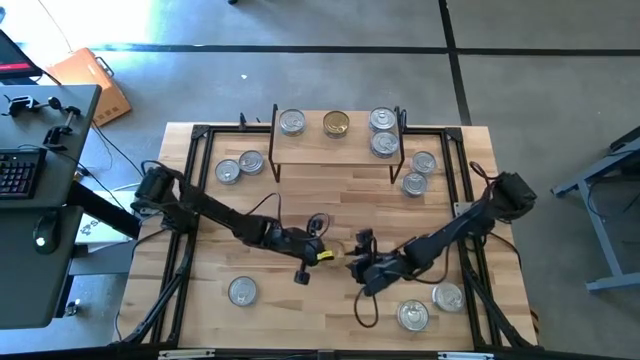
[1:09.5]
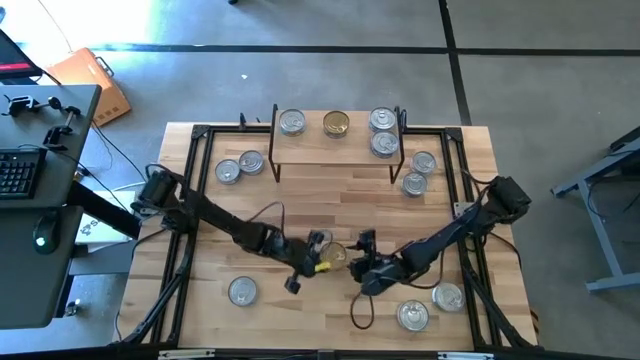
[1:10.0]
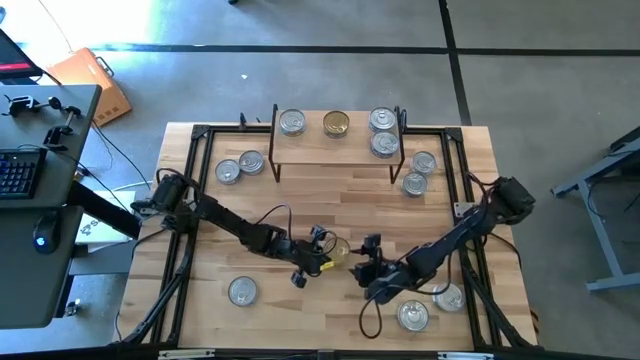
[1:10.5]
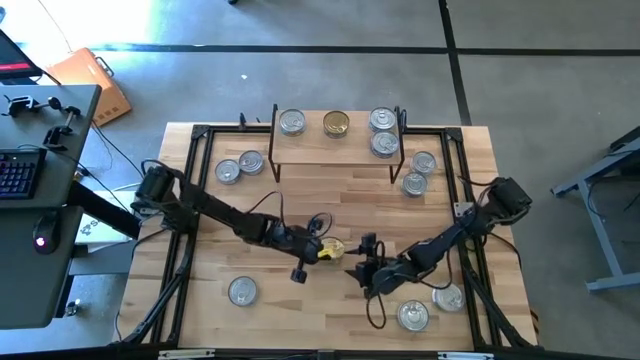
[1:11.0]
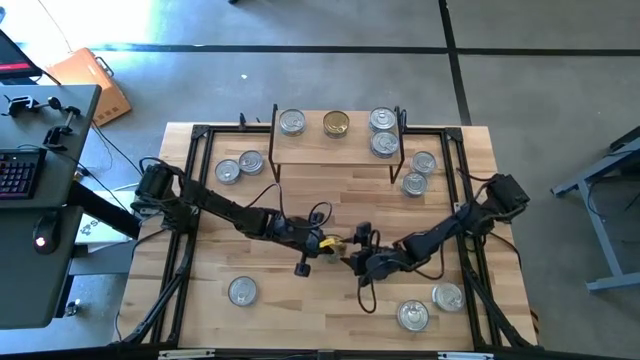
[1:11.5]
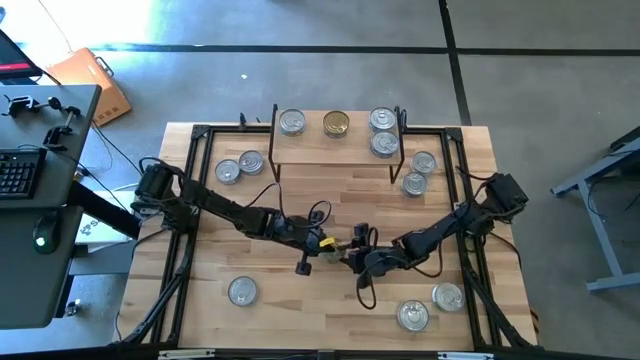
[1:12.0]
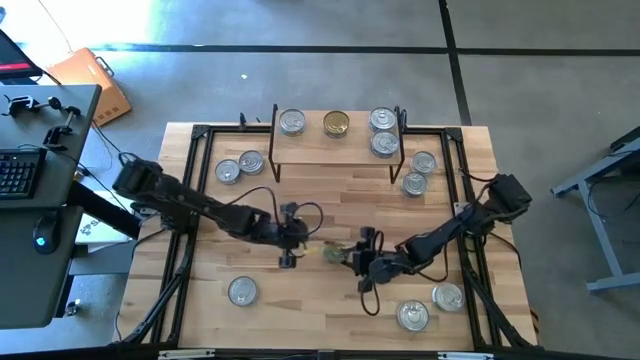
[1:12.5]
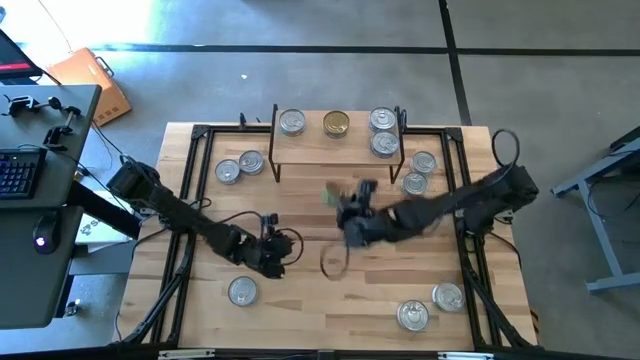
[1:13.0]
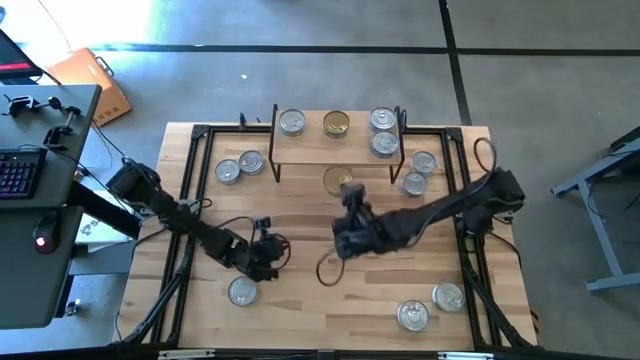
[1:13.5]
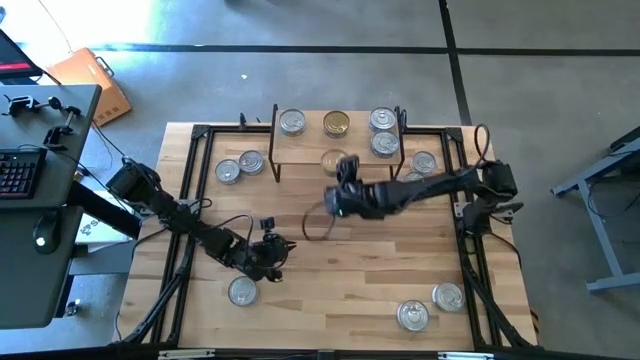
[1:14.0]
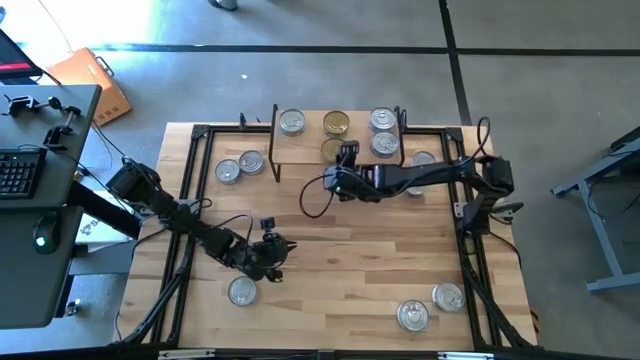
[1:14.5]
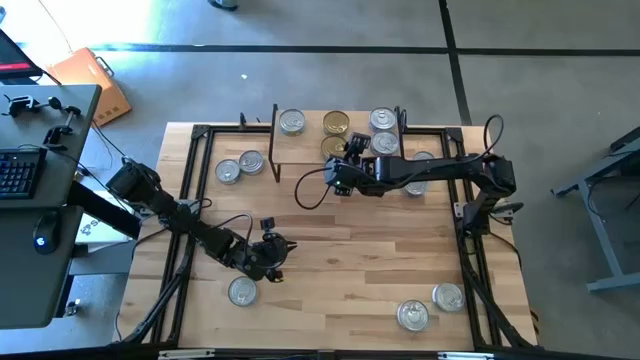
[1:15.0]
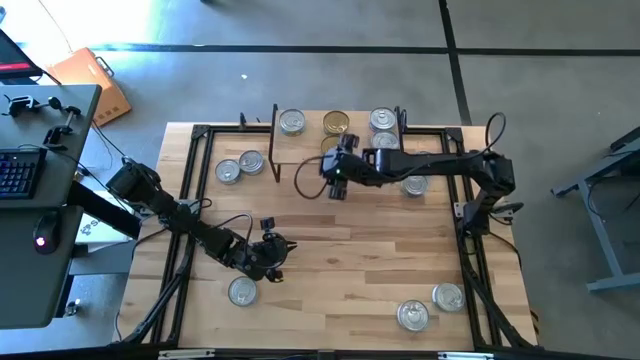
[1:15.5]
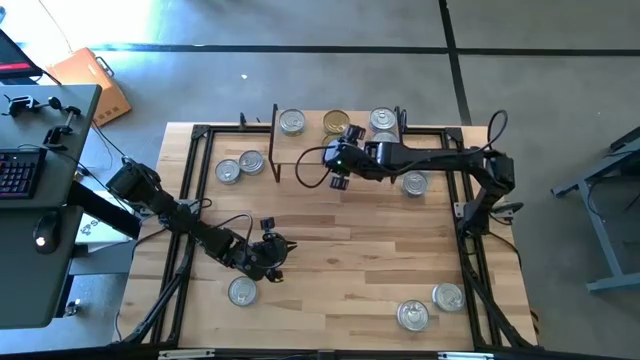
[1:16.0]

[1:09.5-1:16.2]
Task: Stack canned seafood by type on shelf
Put the green tuna can and aligned with the other green tuna can on the shelf

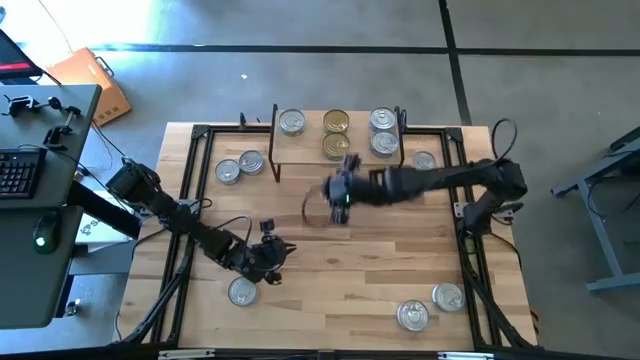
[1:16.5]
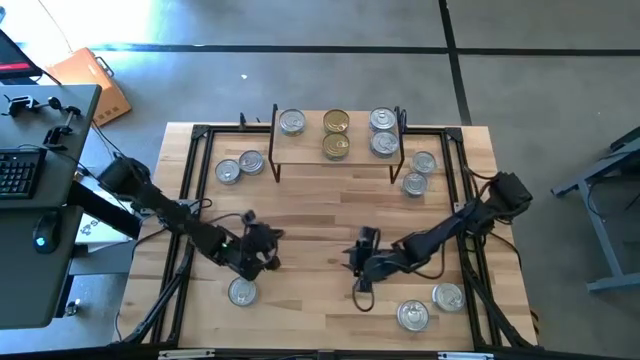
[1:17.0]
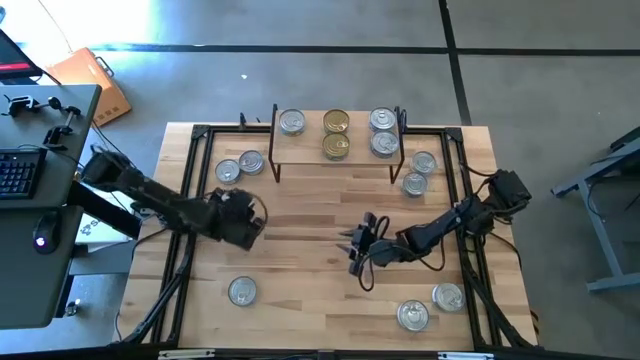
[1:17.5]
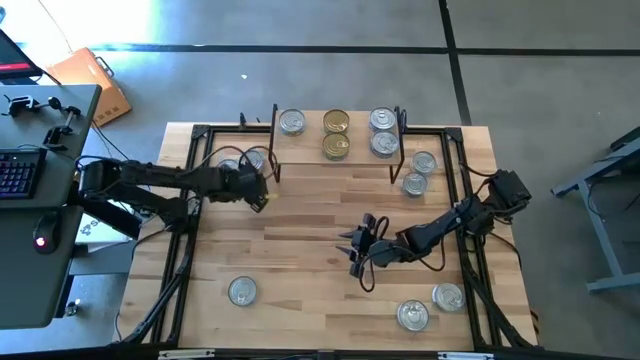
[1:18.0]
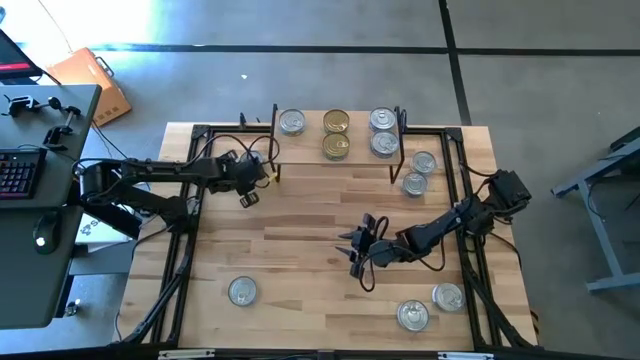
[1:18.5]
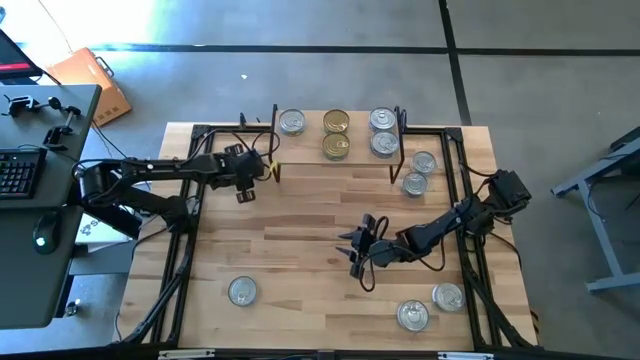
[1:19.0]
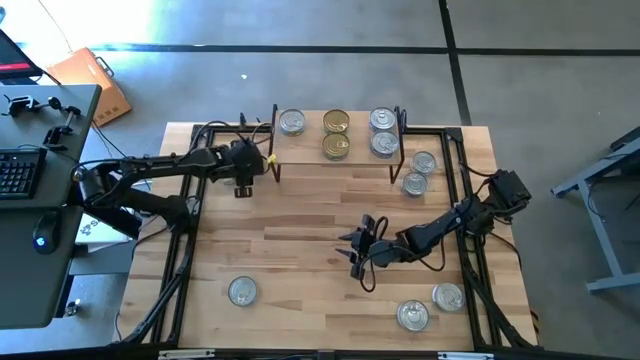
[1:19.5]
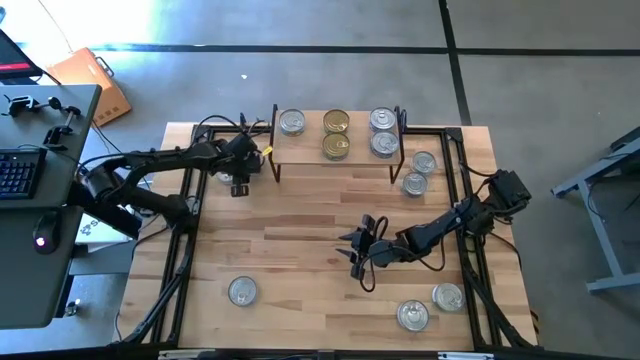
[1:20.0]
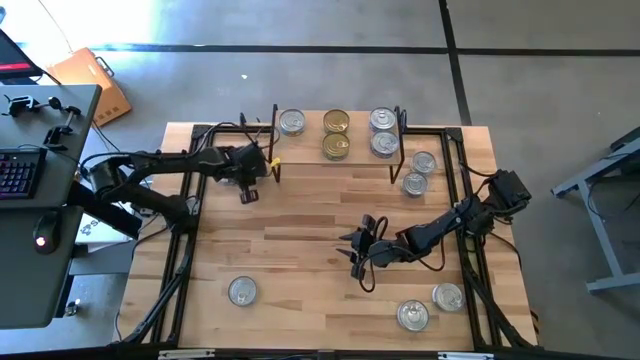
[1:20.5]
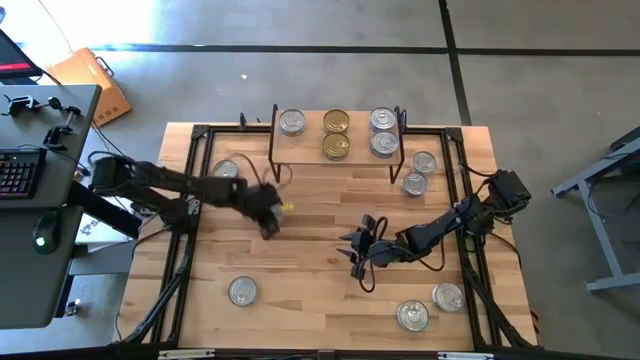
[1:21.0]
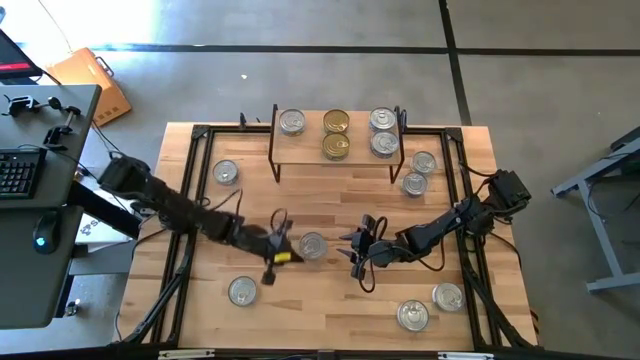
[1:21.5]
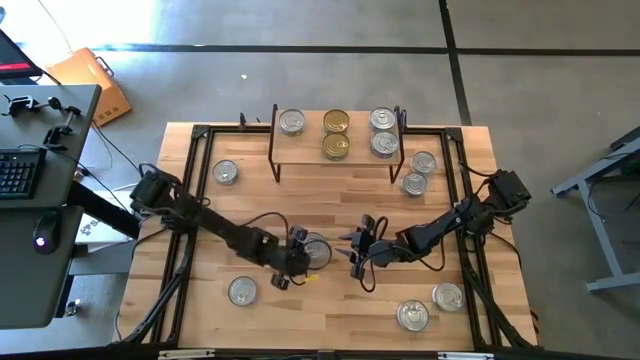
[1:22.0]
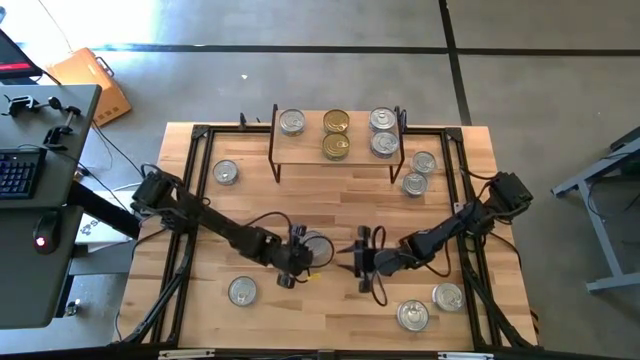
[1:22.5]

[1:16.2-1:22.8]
Put the yellow tuna can and aligned with the other yellow tuna can on the shelf

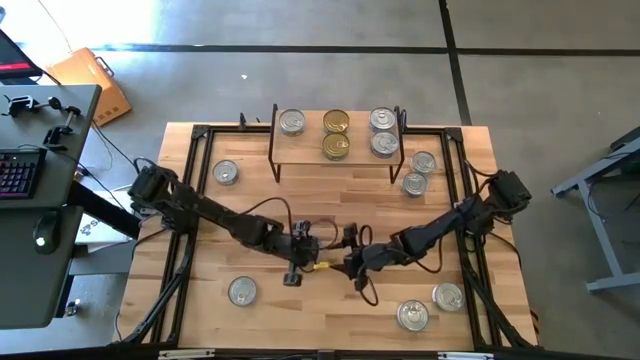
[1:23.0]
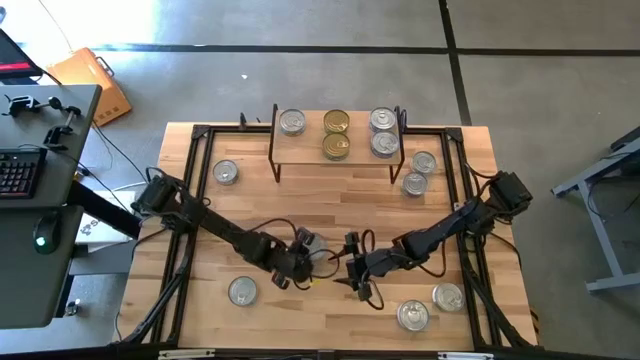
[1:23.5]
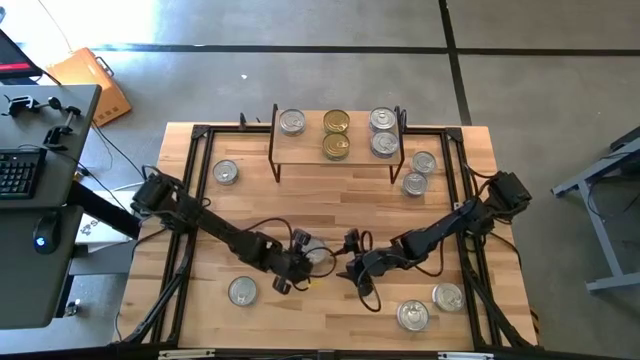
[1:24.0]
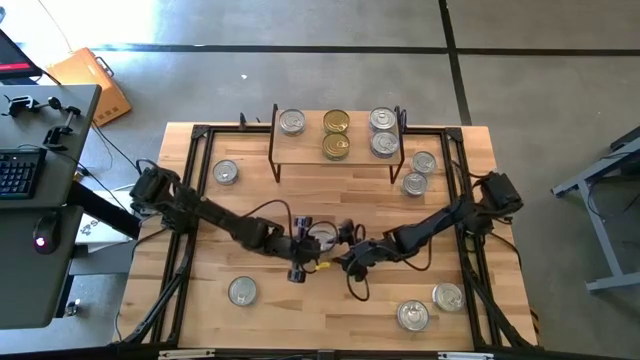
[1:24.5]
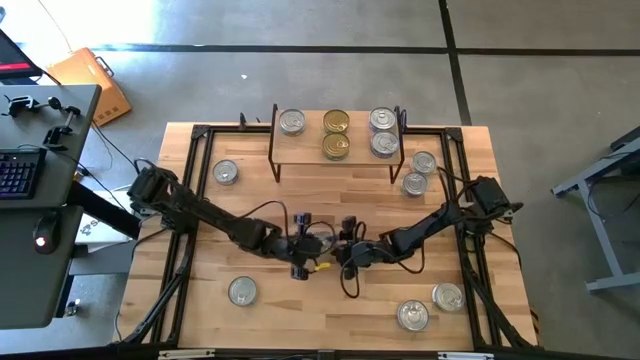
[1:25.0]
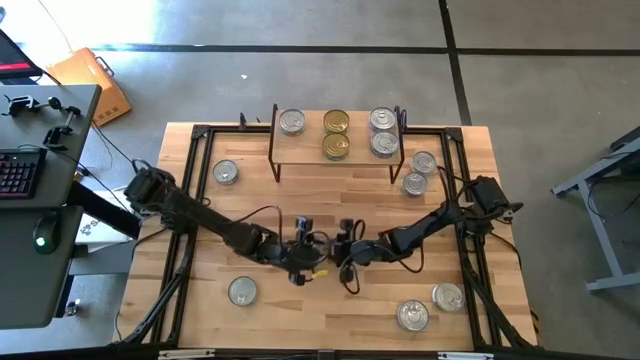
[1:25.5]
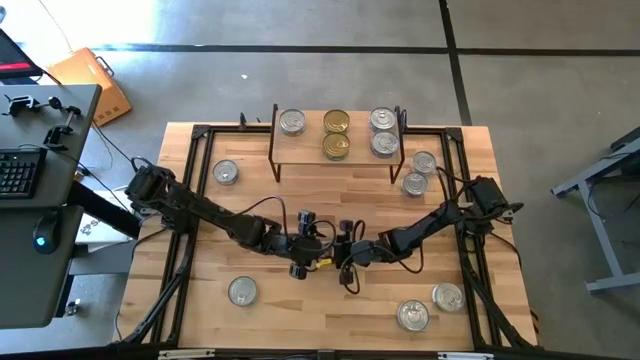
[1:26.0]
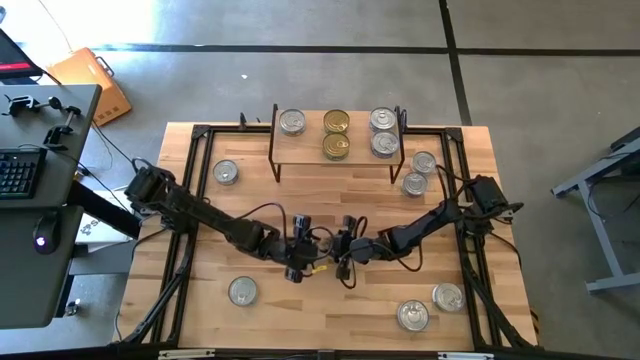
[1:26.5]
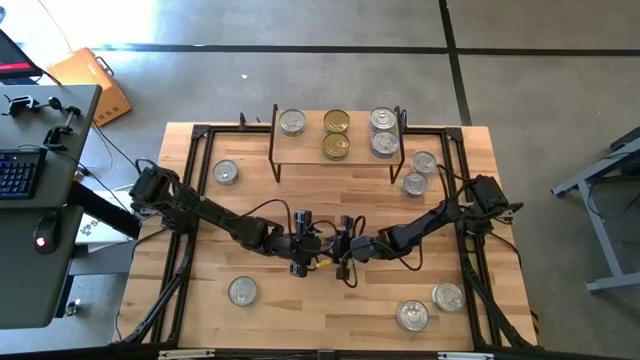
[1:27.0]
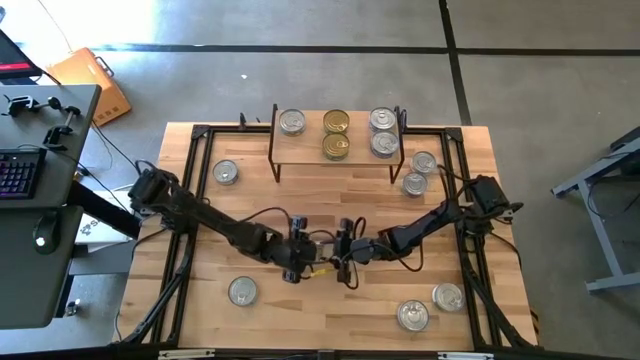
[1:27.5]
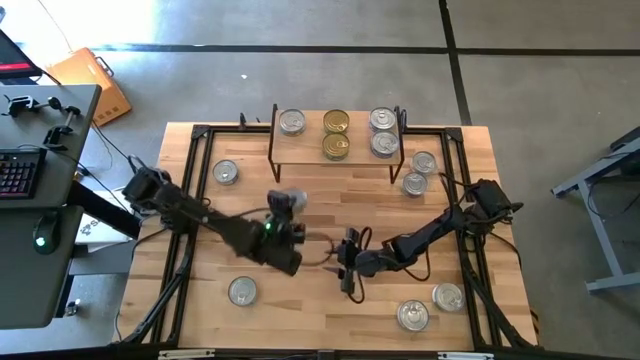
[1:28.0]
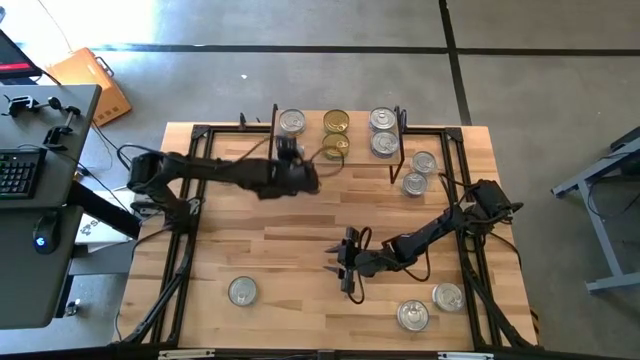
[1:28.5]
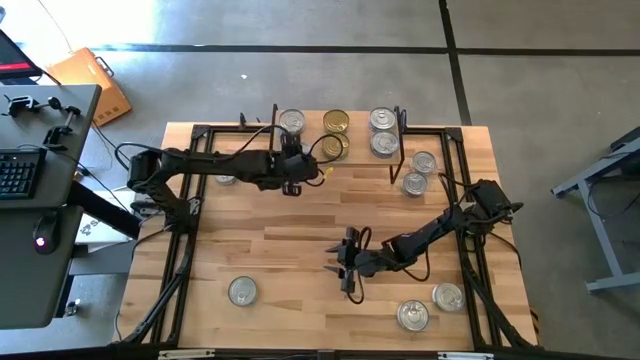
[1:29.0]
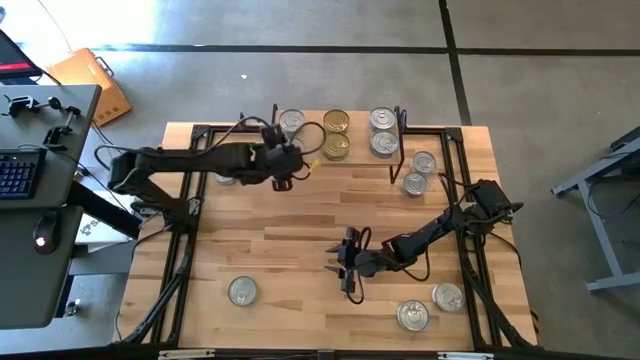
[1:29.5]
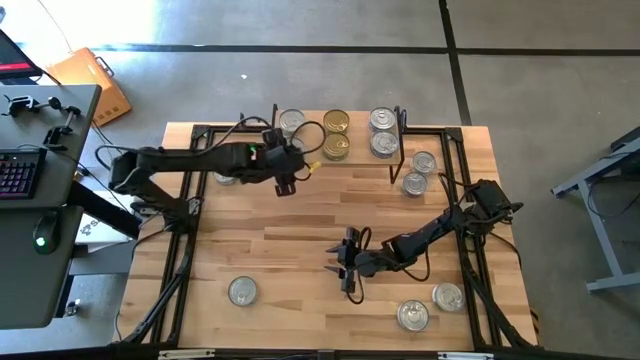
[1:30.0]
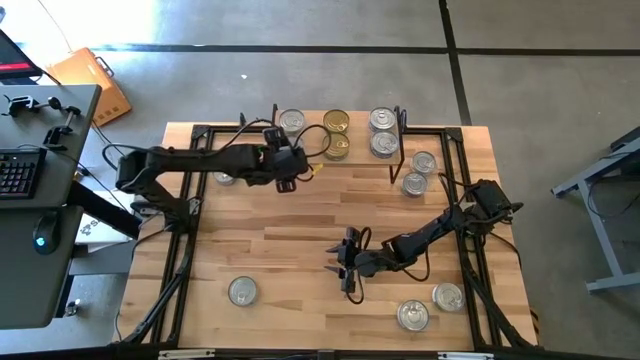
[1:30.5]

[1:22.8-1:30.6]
Put the yellow tuna can and aligned with the other yellow tuna can on the shelf
